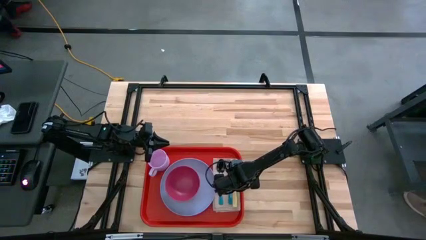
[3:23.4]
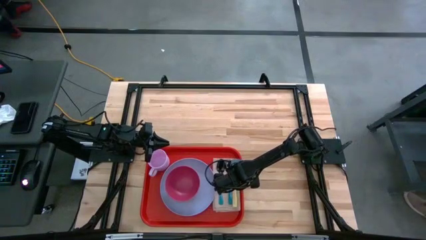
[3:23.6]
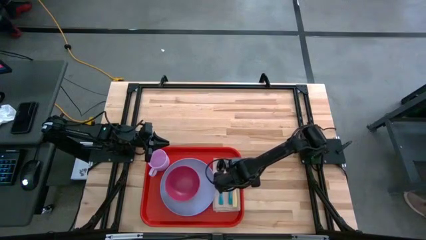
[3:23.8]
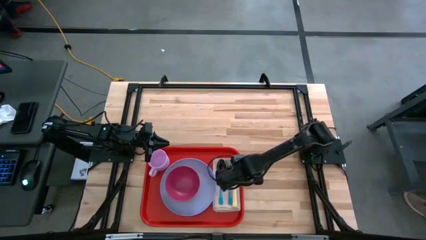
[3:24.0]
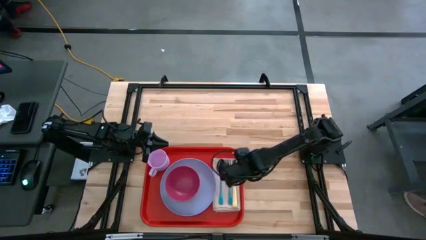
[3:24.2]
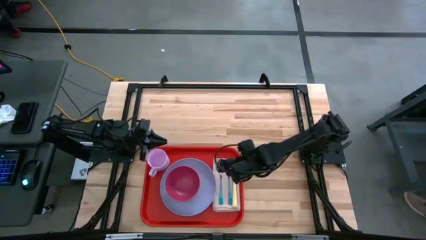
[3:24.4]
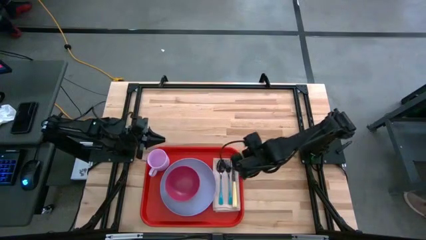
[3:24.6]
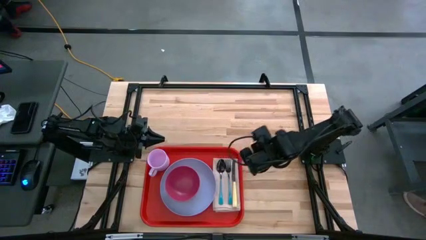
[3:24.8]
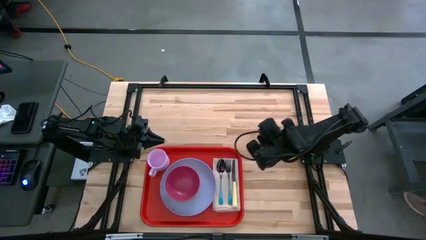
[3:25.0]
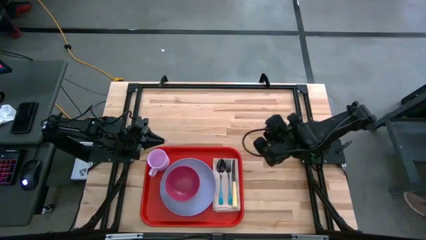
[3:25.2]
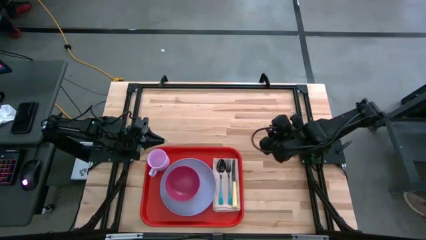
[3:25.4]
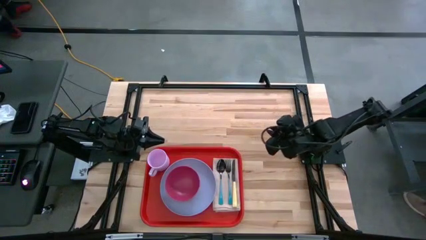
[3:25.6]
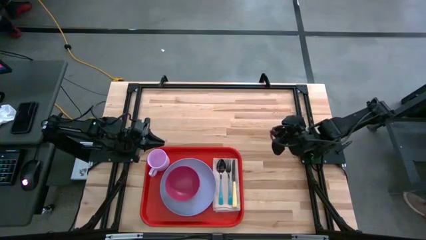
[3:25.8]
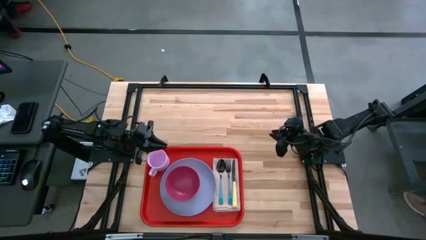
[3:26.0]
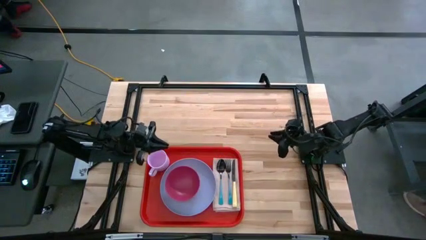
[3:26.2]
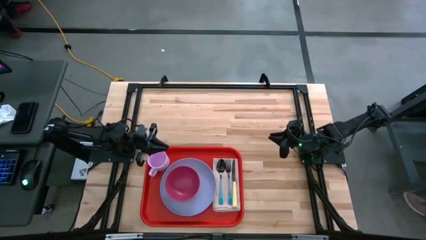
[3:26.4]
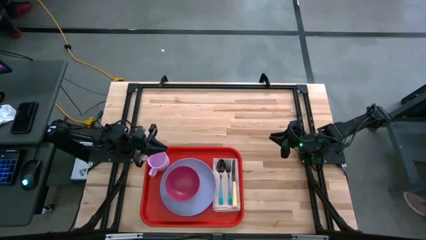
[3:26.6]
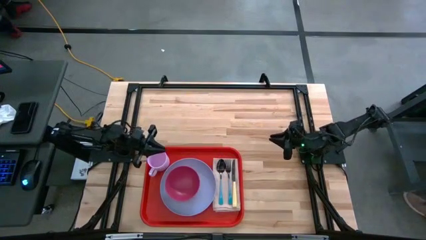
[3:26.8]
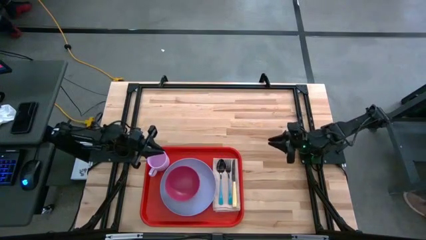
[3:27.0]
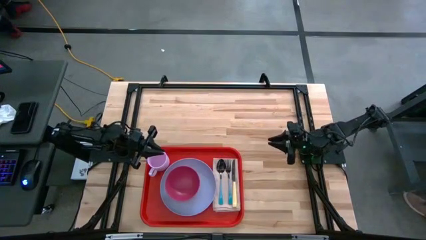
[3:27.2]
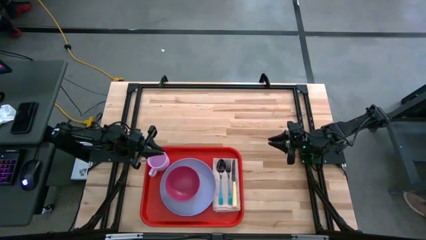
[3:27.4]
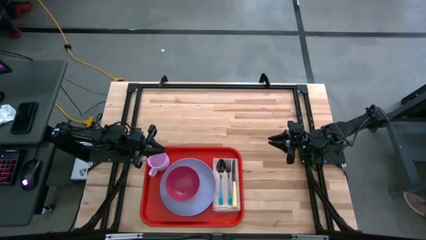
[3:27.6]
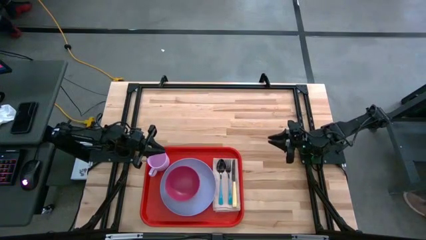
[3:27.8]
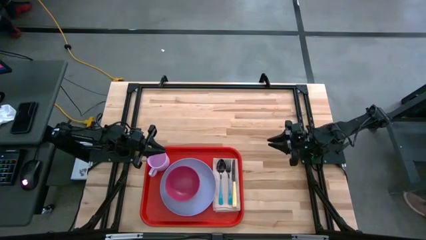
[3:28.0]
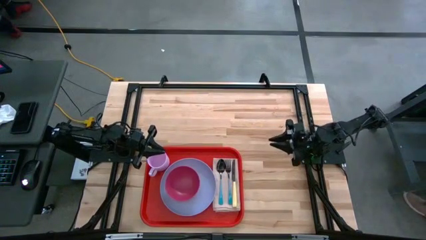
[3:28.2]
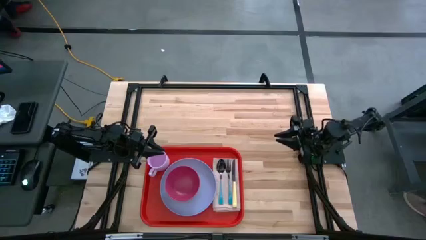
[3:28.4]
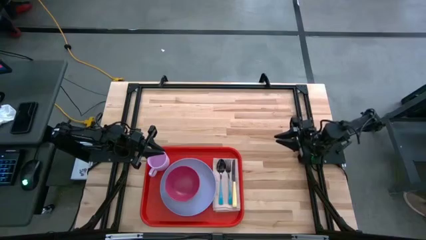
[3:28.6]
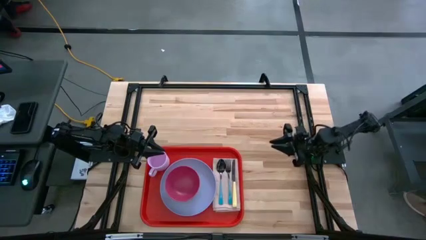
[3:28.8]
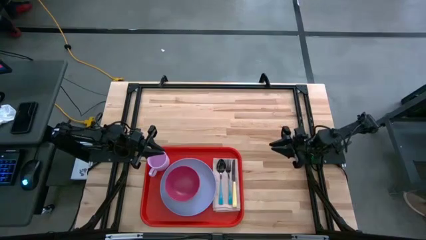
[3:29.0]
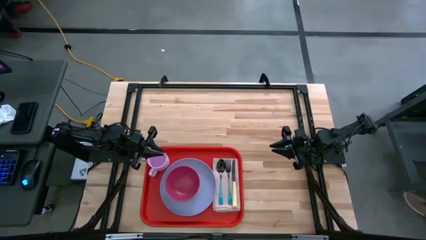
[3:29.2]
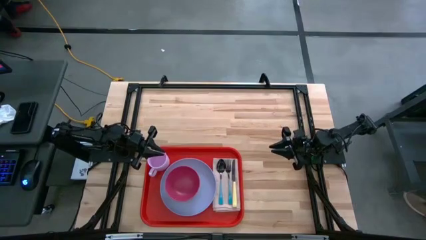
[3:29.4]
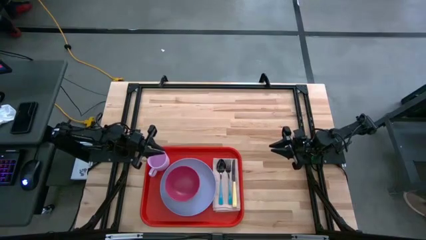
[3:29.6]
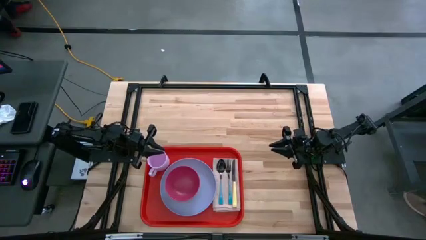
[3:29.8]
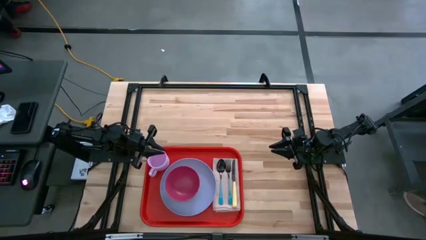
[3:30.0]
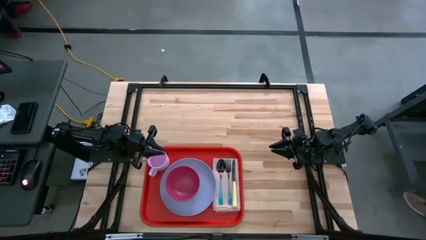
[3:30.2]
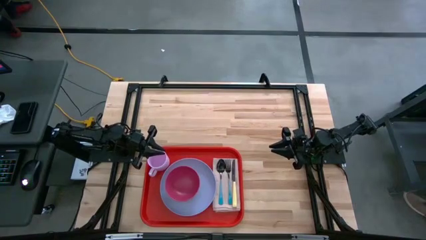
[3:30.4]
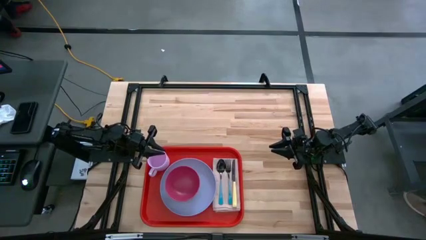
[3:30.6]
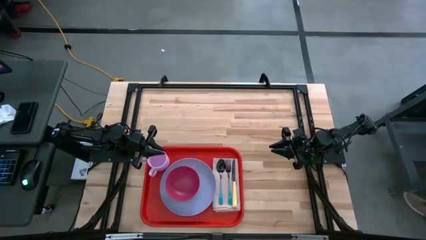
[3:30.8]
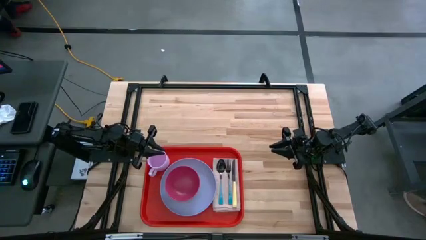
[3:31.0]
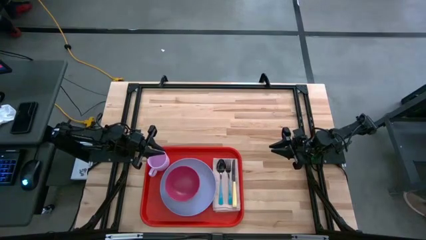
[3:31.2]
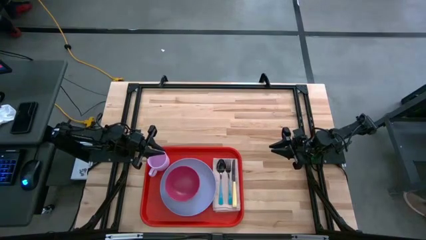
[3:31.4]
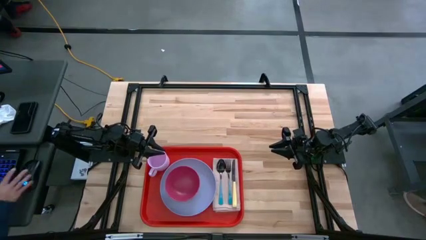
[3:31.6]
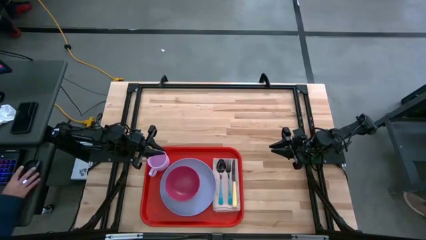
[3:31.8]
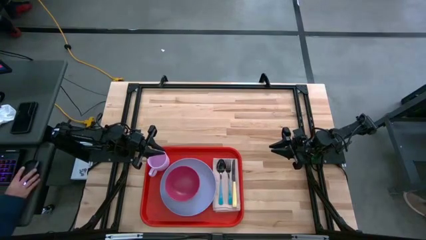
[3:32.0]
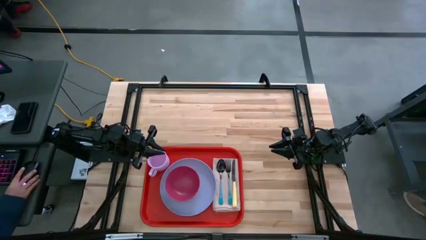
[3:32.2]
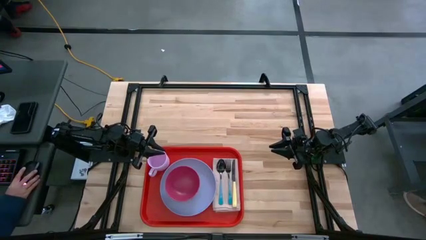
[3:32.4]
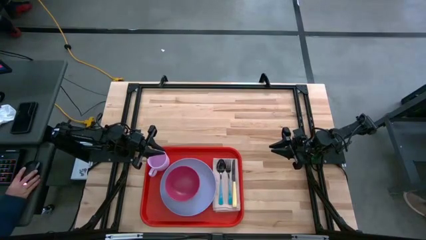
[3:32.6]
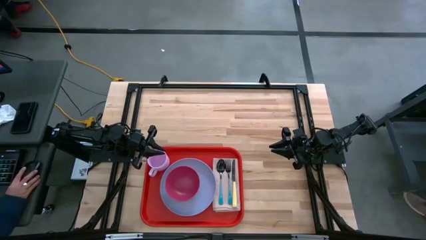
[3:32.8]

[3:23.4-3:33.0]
Task: Set up tray
Return to Home Position

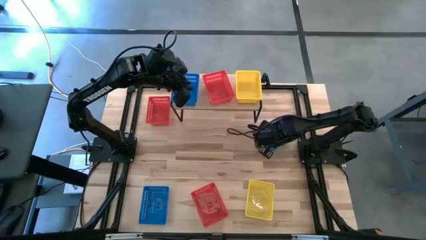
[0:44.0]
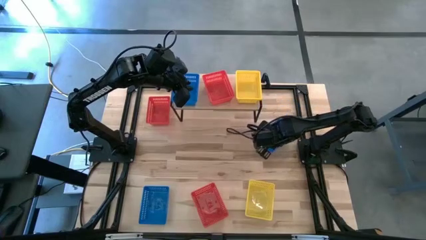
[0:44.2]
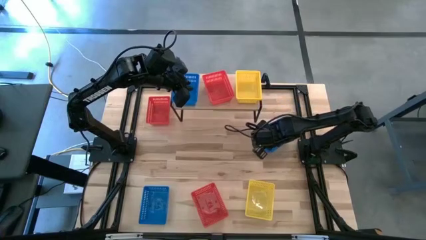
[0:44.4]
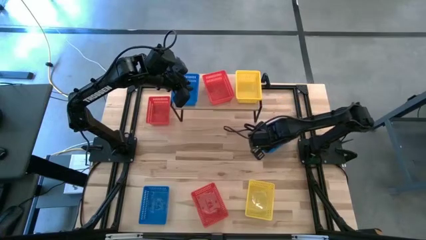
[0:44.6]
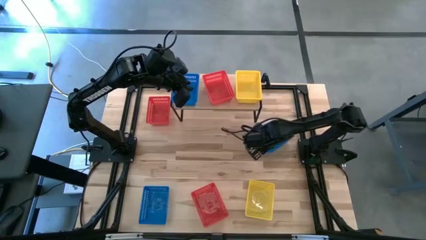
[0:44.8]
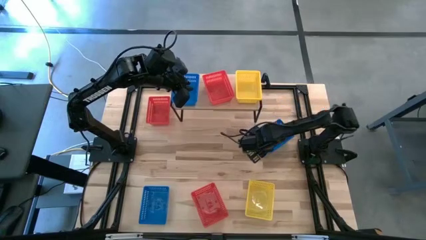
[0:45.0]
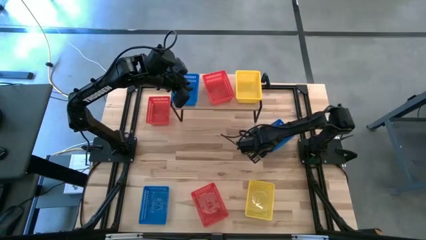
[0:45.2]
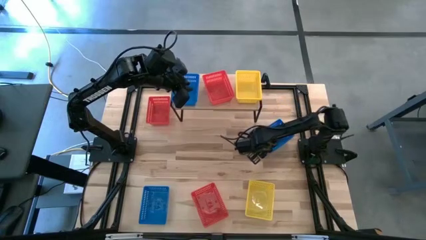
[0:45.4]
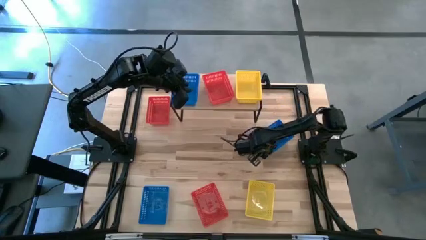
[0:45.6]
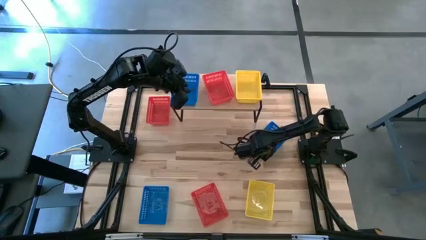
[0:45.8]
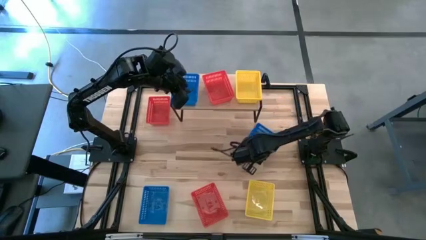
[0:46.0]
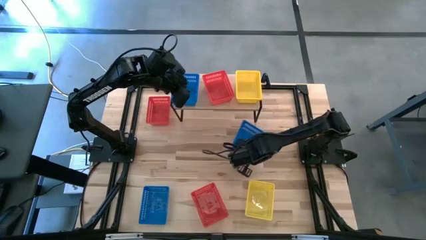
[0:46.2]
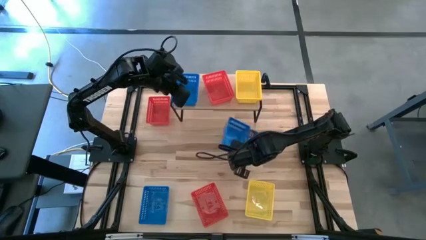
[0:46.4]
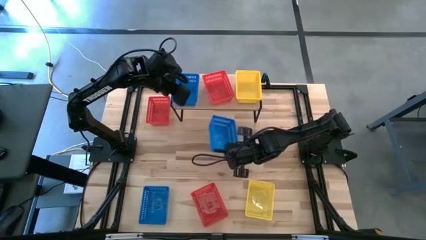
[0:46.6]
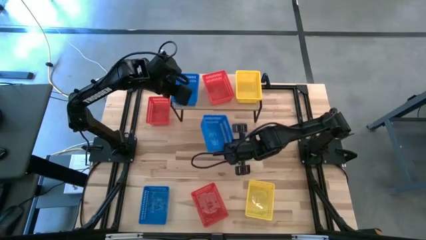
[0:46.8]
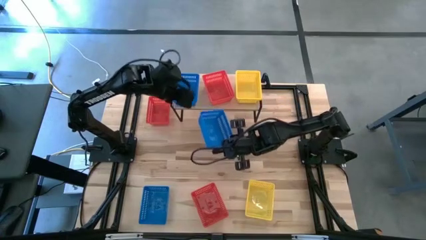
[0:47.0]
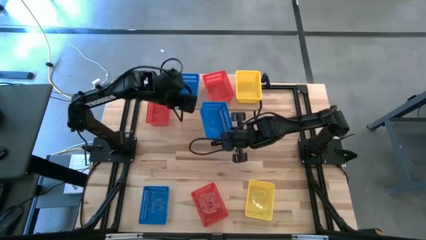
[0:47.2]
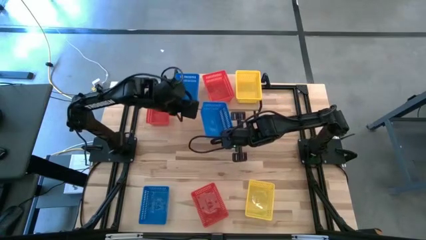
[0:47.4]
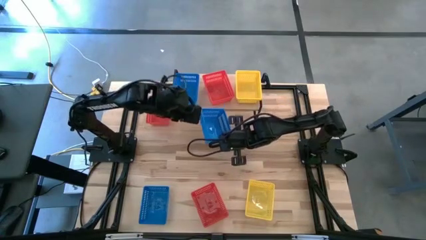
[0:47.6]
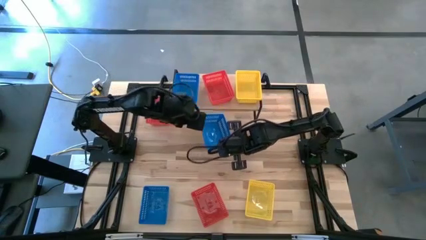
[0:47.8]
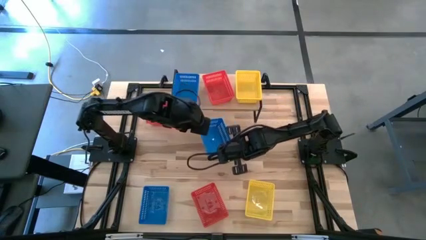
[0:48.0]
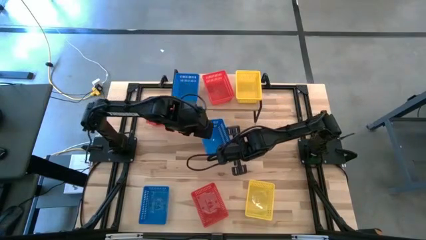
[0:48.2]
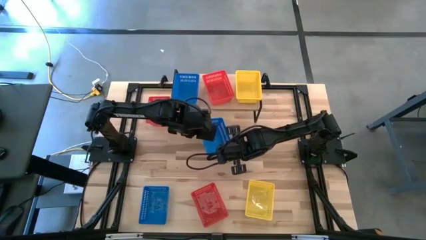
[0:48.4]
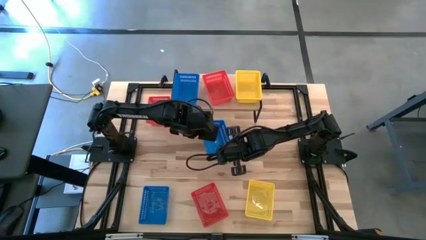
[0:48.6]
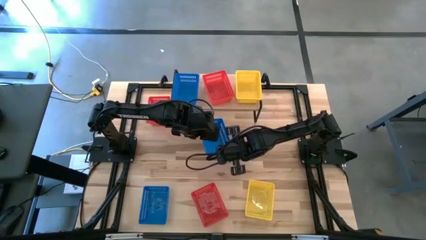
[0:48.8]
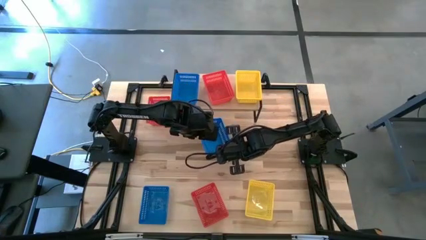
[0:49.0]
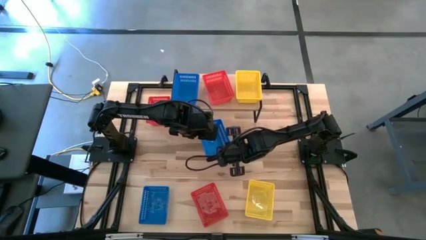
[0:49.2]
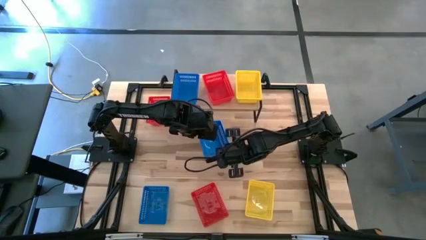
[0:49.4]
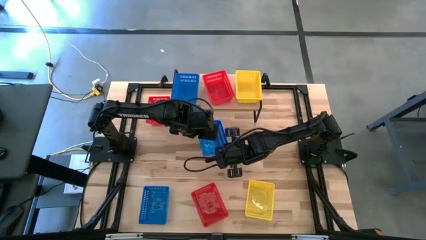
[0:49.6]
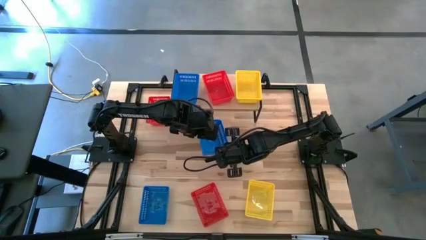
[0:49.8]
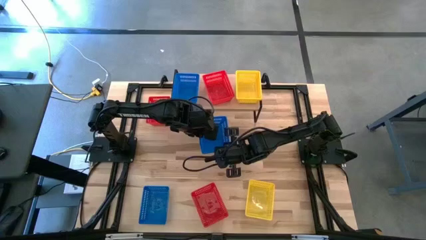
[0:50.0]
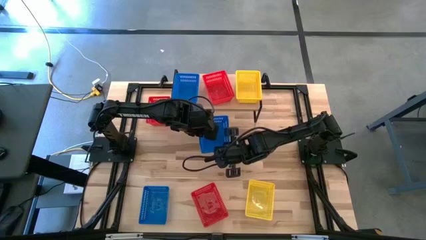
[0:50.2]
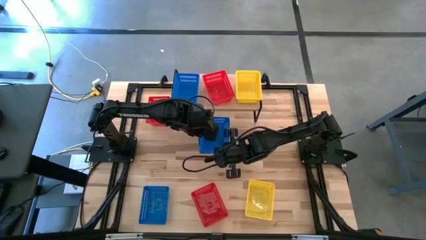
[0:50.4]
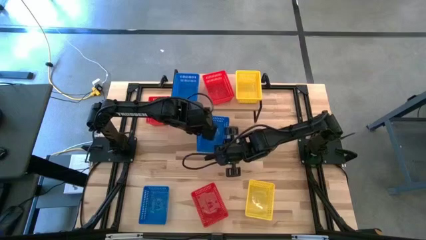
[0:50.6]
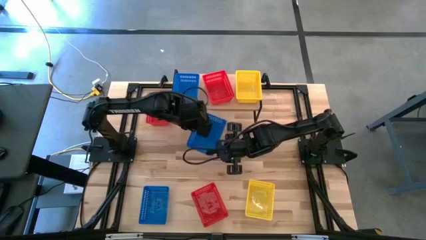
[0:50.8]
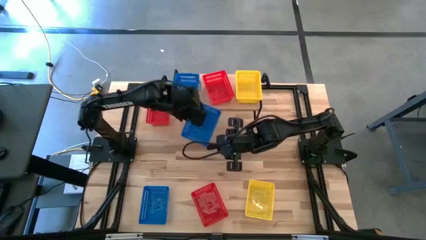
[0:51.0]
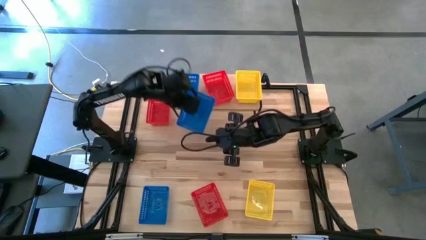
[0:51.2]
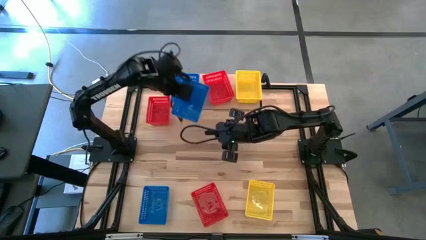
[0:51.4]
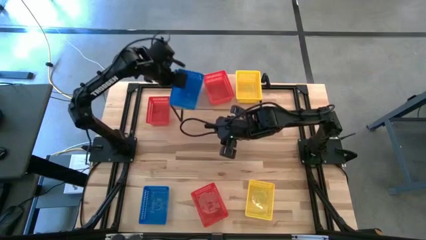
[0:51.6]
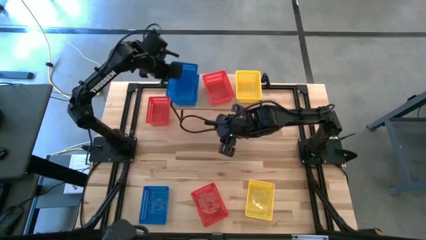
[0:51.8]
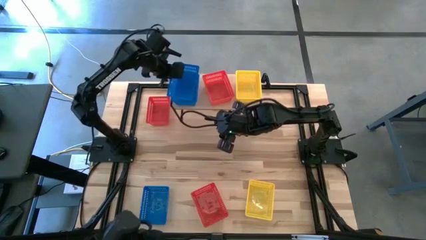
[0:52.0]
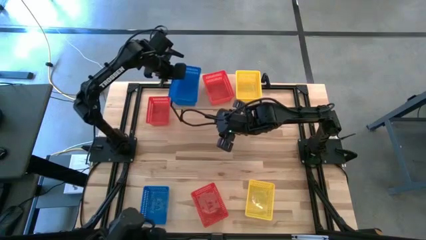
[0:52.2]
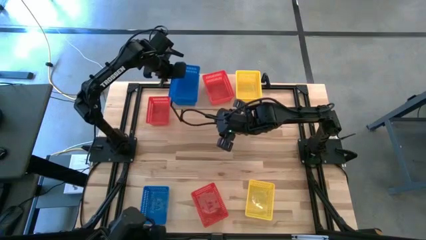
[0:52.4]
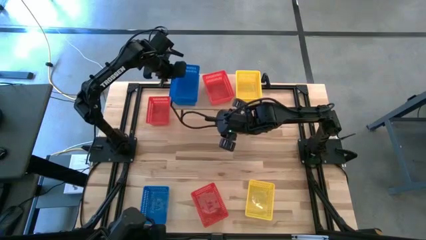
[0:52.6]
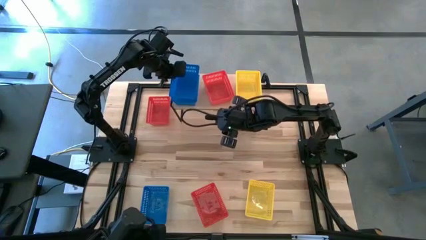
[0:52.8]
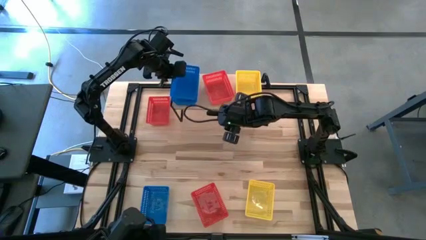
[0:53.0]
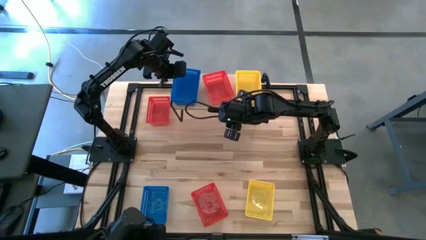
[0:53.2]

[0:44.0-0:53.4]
Task: Stack baskets on shelf by color
Stack the top blue basket into the other blue basket on the shelf
